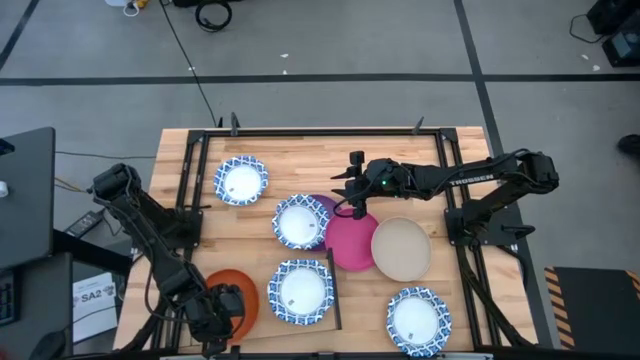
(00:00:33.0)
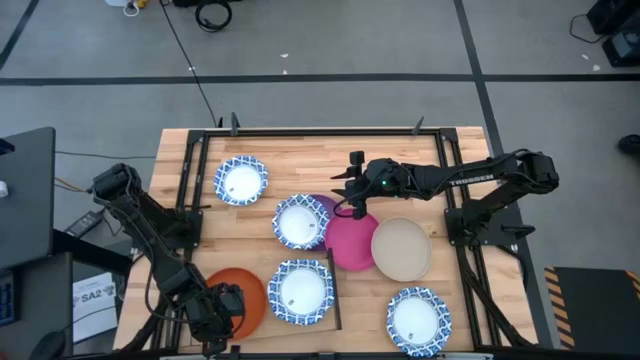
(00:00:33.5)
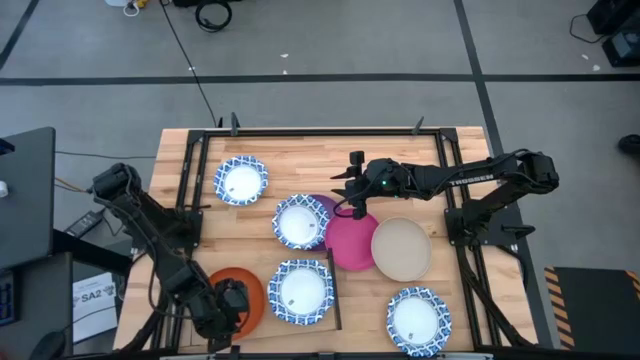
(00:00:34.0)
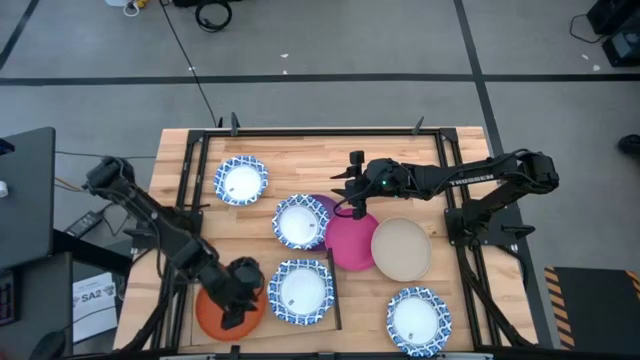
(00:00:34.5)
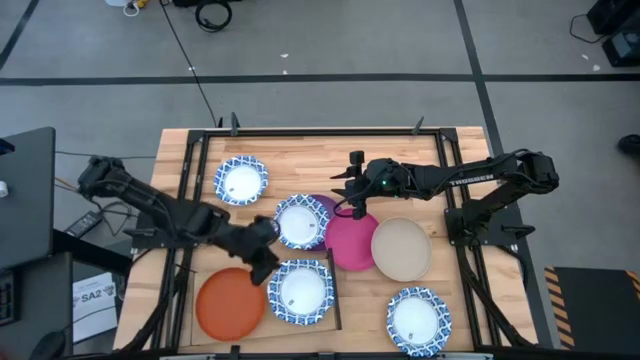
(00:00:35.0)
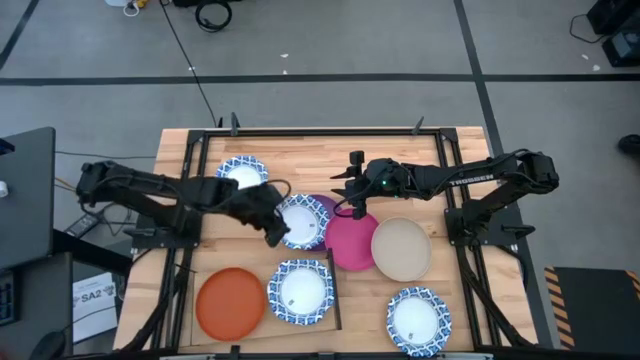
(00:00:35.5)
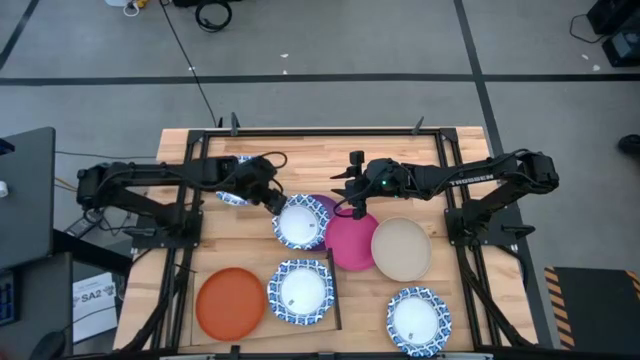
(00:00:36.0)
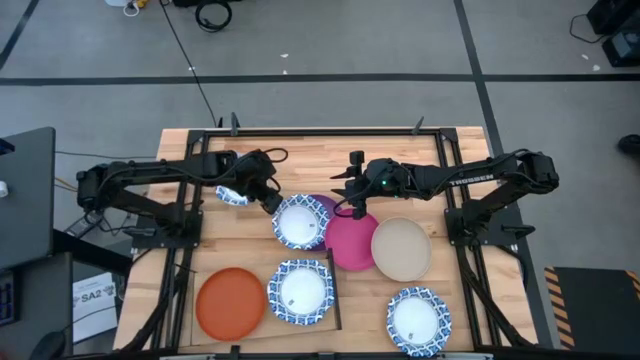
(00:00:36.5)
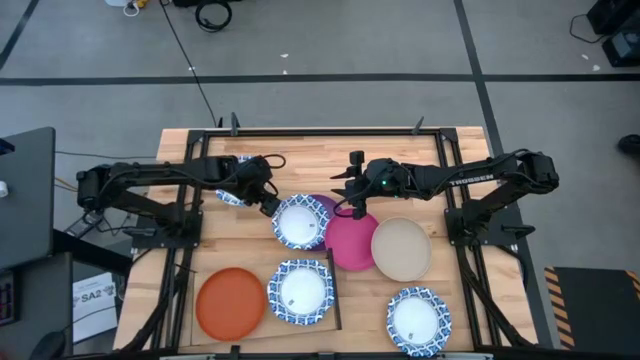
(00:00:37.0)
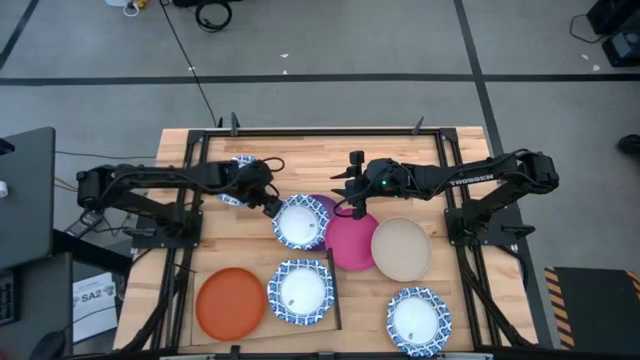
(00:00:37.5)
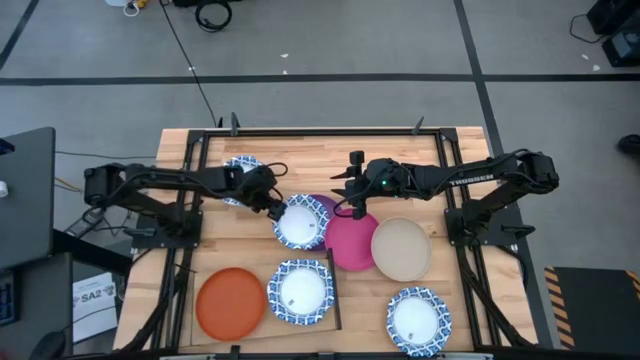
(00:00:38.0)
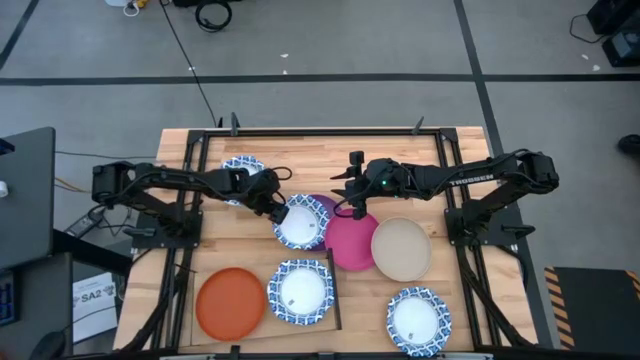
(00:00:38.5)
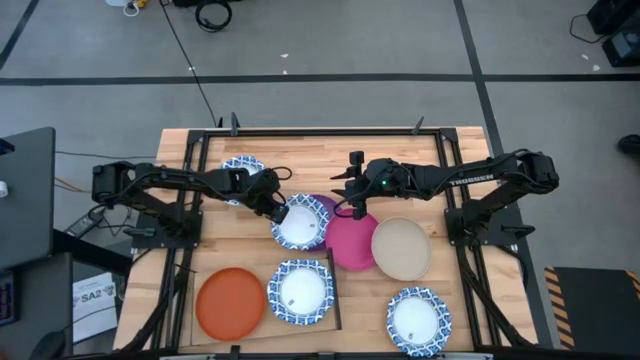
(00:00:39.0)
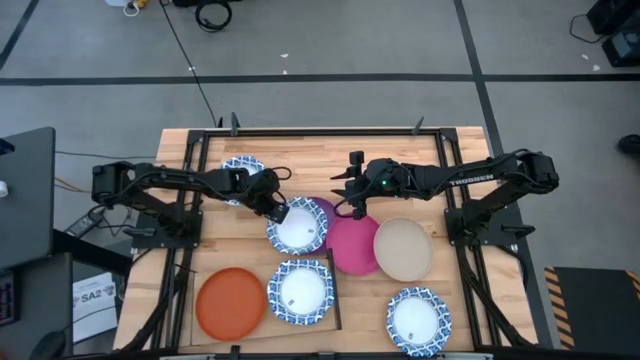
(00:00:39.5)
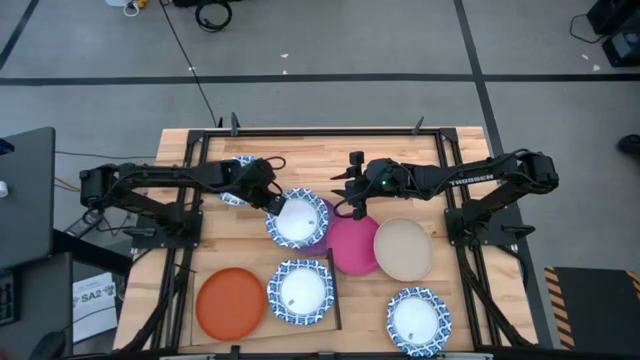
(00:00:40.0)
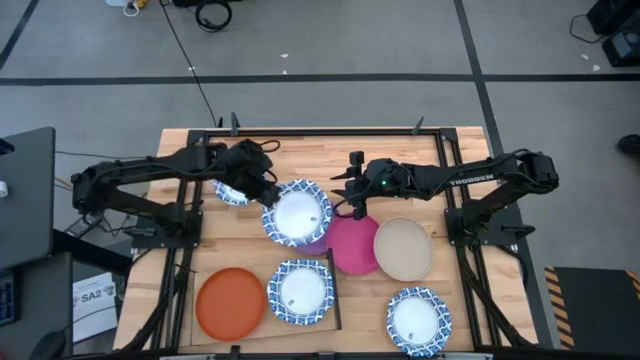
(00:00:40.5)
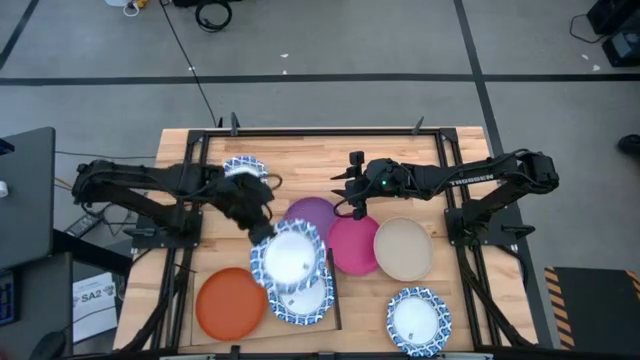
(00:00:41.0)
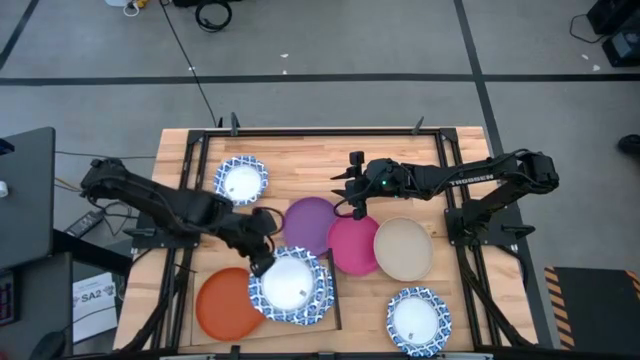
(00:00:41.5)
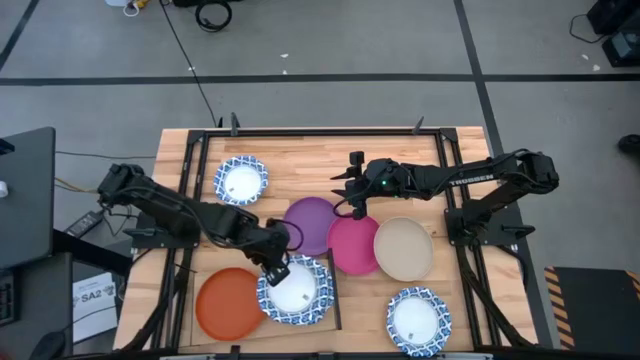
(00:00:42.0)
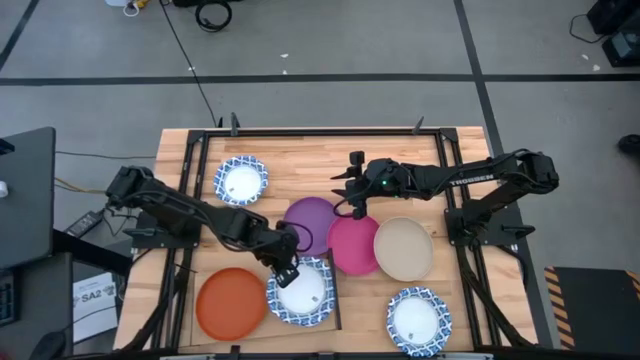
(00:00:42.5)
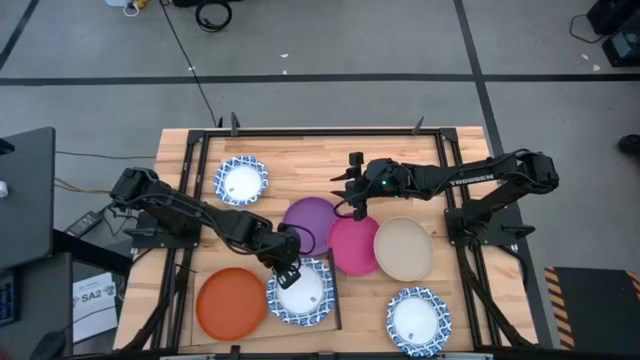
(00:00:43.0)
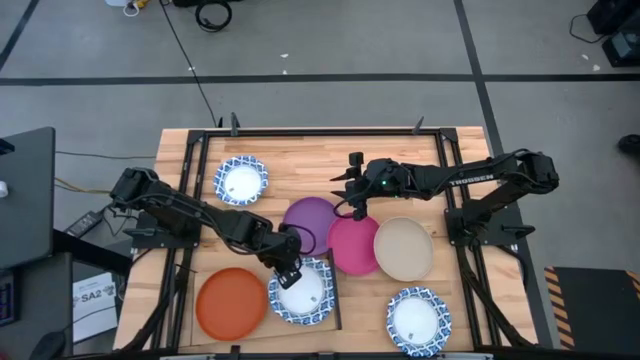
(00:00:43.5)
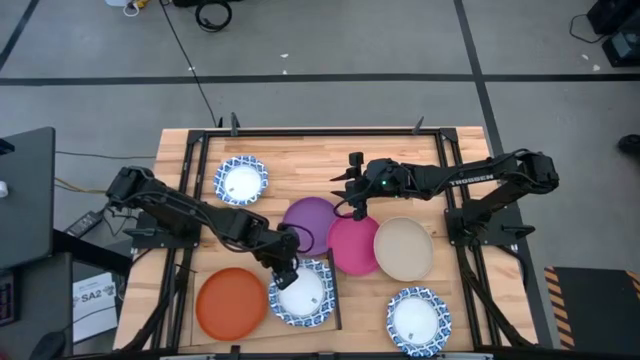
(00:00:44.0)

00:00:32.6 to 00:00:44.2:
Task: Place and stack plates onto a shelf
Stack the middle blue patterned bowl on top of the blue patterned bowl on the shelf

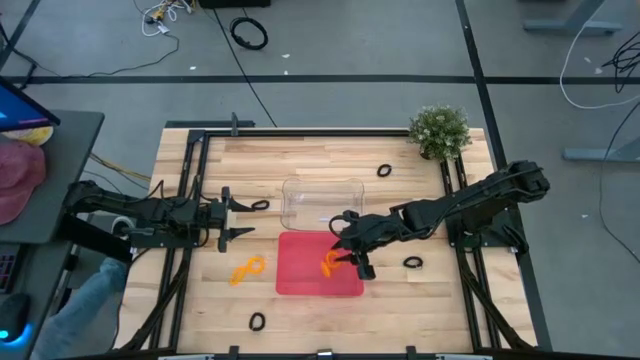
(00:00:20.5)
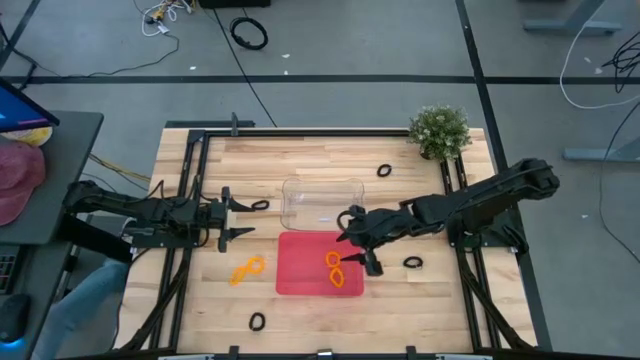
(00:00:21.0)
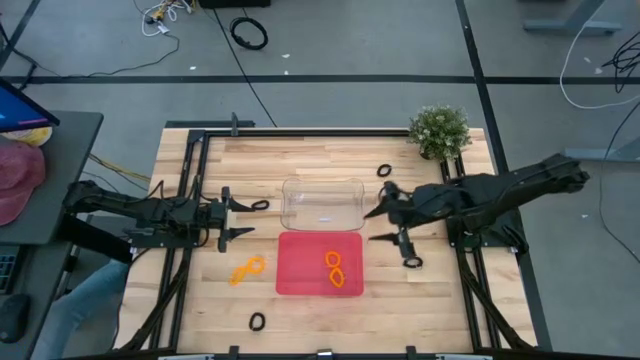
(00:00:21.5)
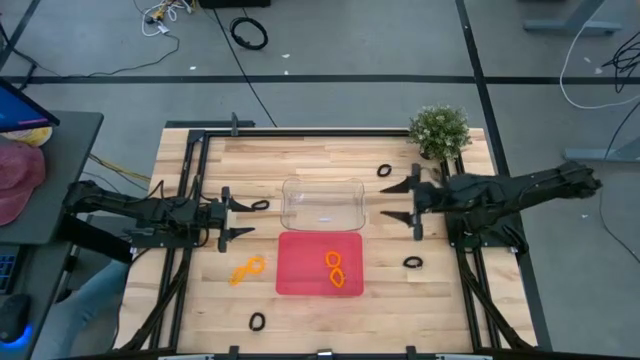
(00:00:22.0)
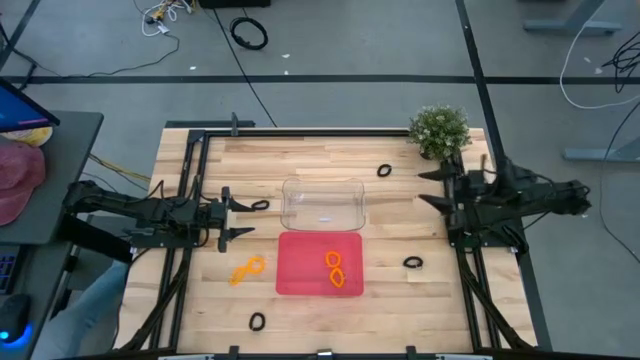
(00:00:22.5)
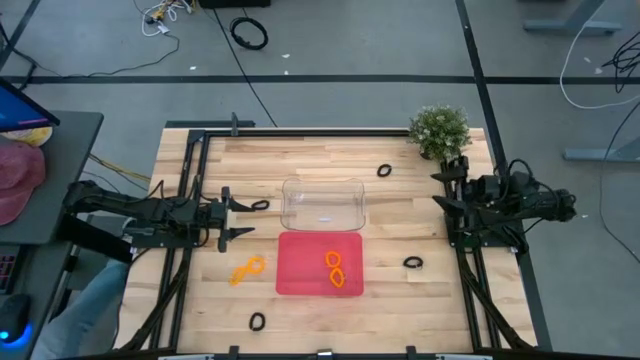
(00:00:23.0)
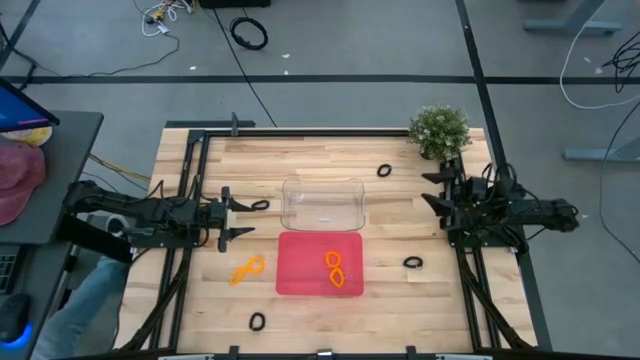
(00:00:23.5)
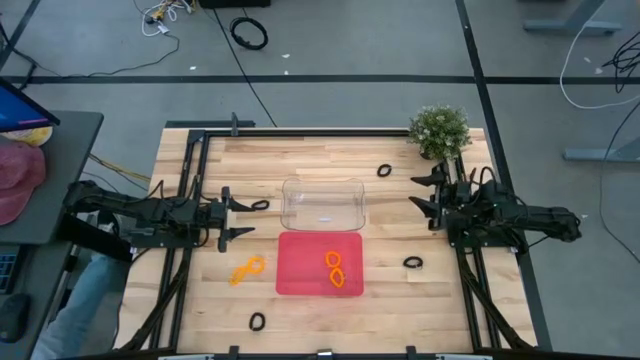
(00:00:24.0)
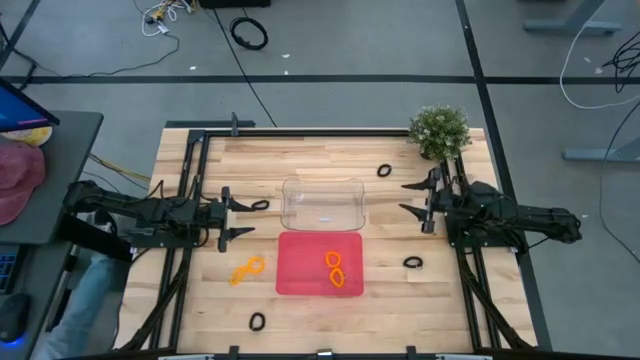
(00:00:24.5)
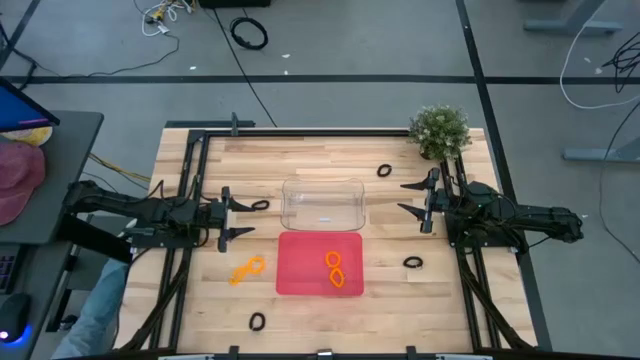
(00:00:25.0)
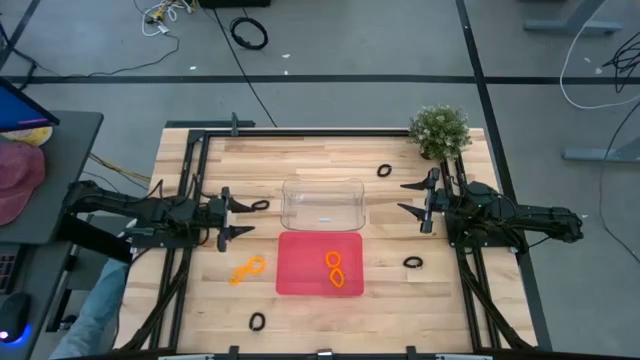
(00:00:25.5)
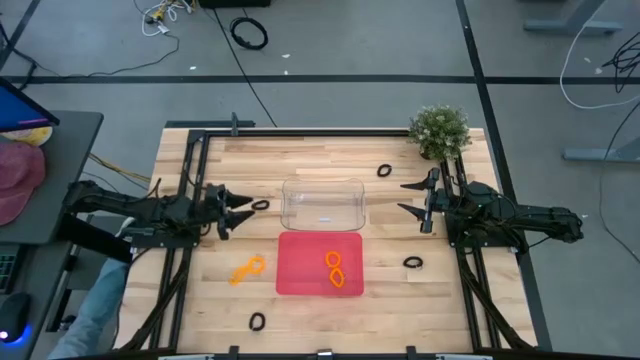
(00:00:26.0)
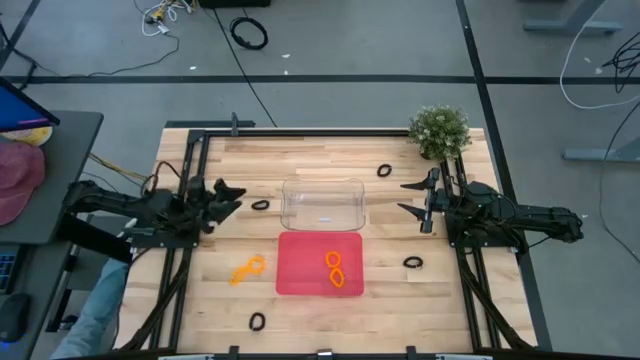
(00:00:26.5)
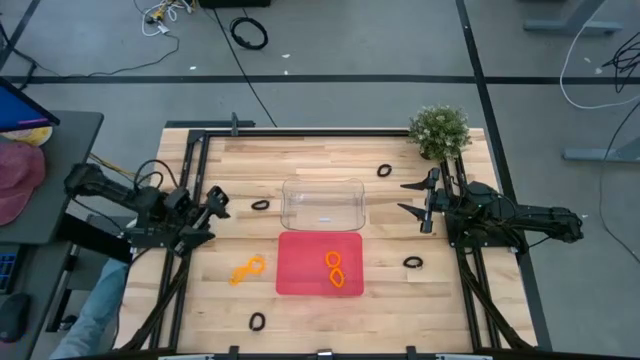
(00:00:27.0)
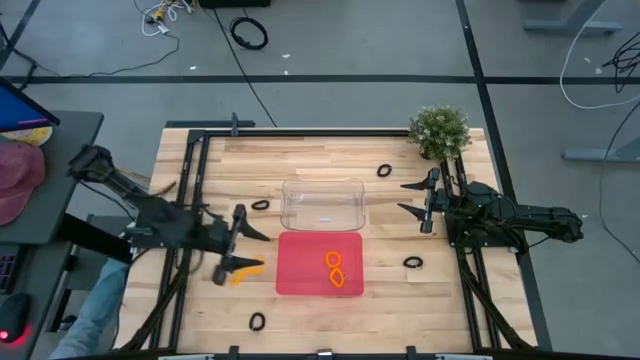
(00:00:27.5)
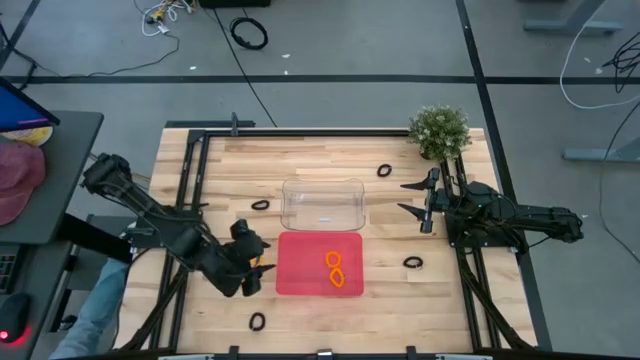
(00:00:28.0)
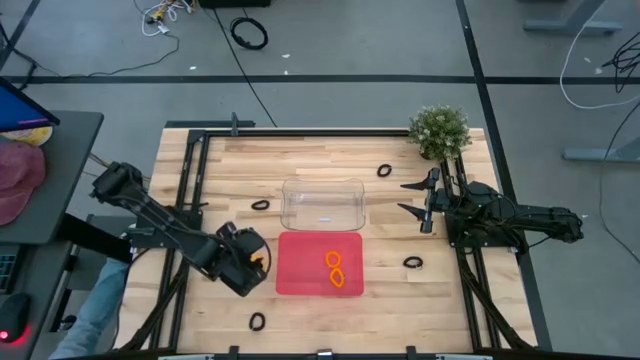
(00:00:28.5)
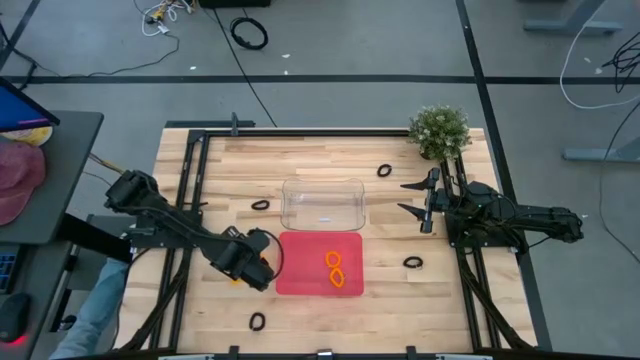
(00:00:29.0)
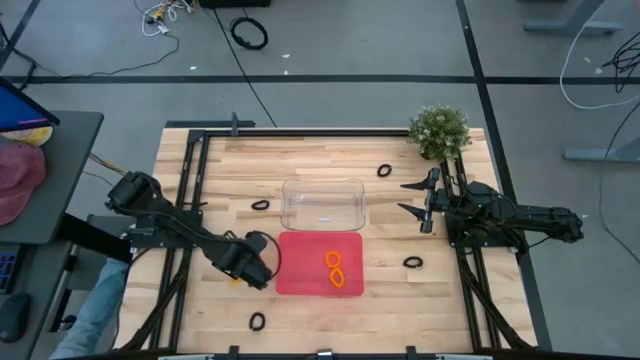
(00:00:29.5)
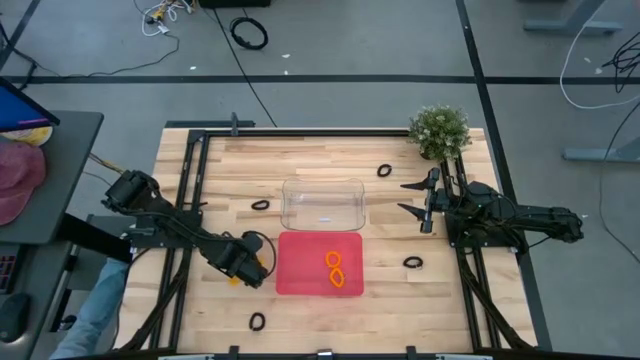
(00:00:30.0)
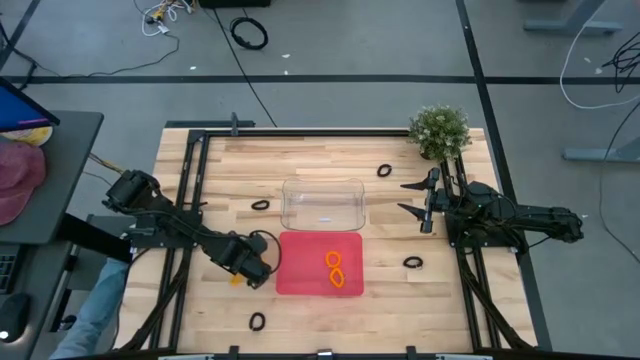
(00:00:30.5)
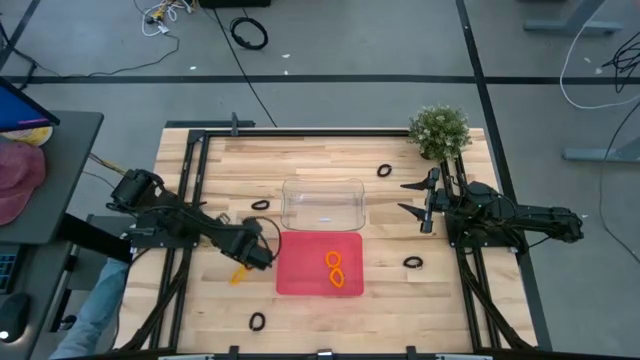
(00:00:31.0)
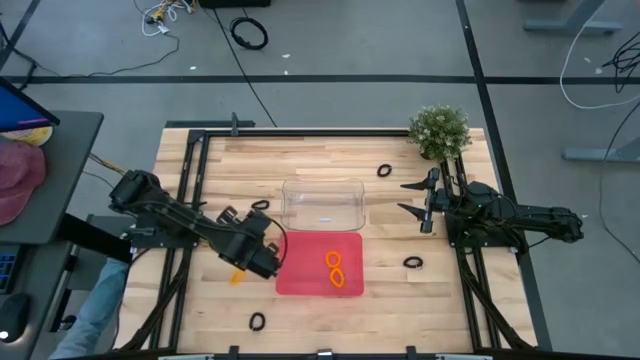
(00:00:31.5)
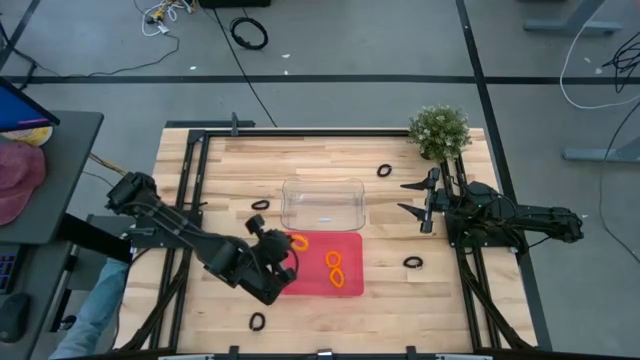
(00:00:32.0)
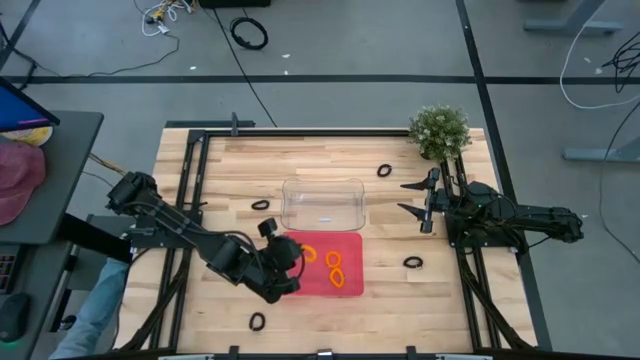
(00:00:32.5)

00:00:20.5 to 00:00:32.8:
Task: Sort spring keychains
Put the orange spring keychain into the pink bin
